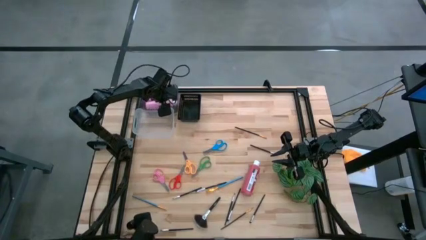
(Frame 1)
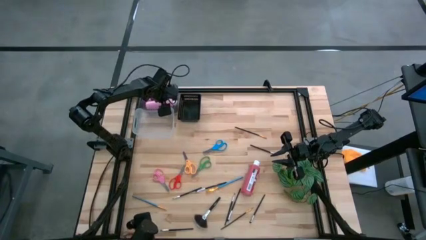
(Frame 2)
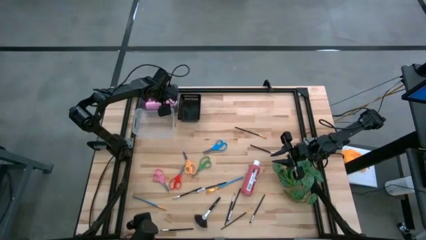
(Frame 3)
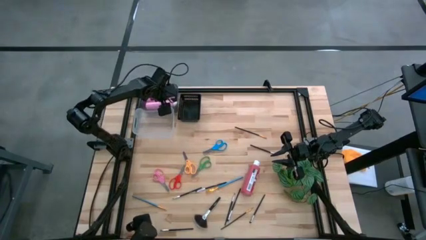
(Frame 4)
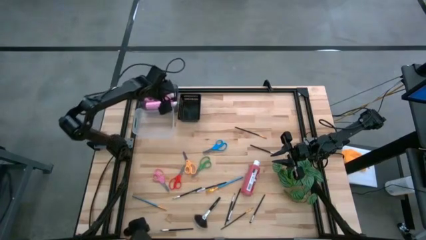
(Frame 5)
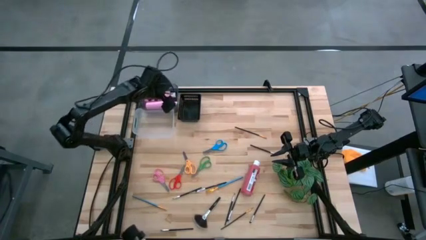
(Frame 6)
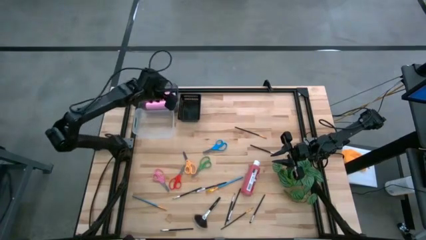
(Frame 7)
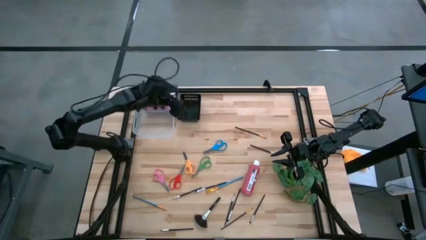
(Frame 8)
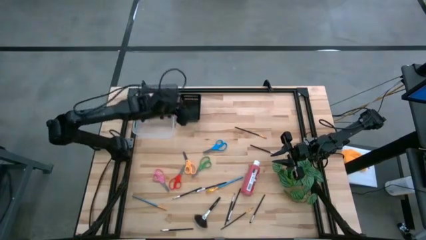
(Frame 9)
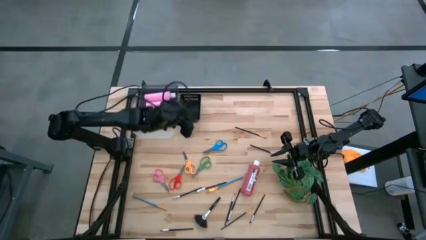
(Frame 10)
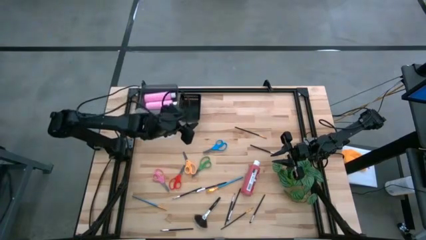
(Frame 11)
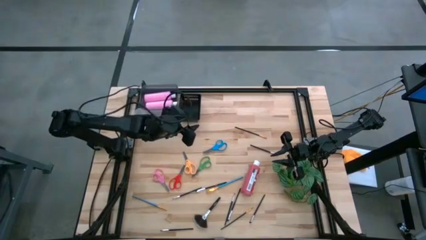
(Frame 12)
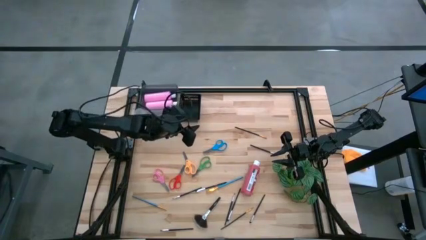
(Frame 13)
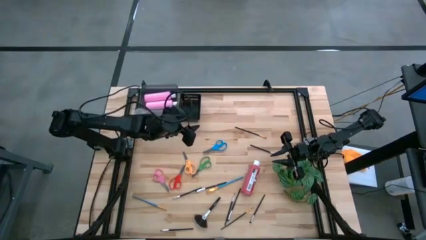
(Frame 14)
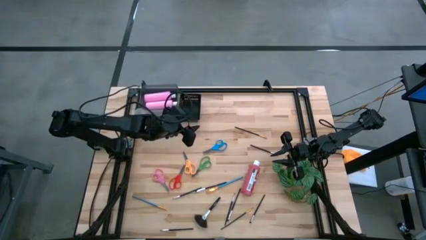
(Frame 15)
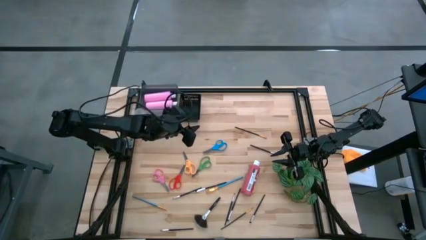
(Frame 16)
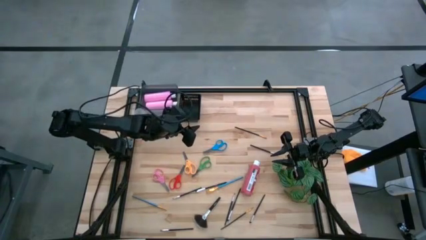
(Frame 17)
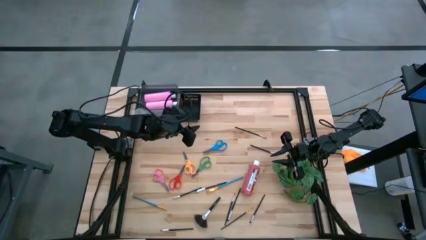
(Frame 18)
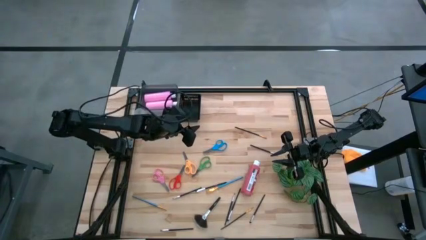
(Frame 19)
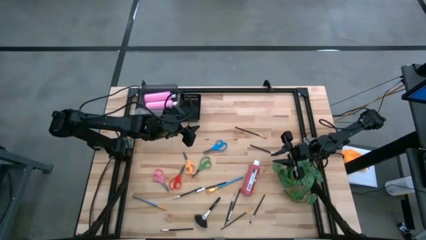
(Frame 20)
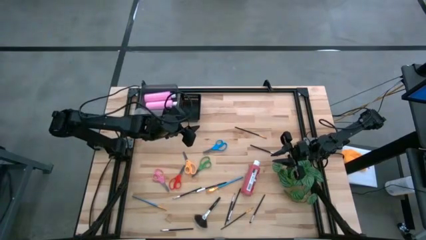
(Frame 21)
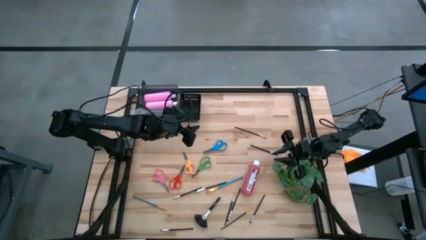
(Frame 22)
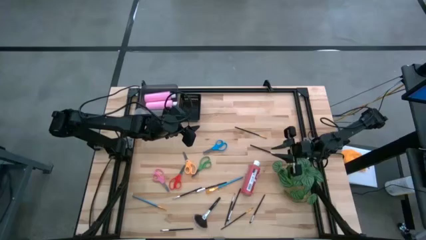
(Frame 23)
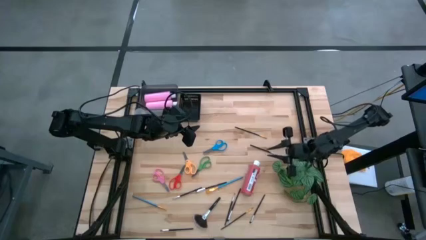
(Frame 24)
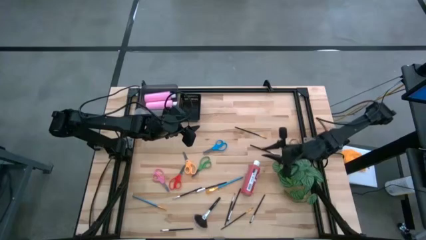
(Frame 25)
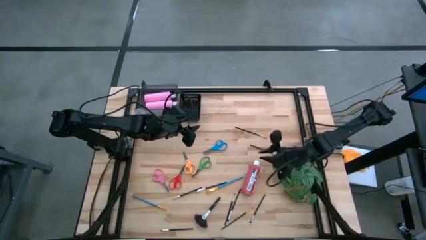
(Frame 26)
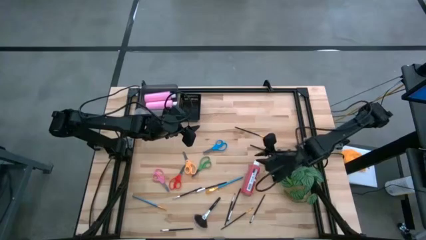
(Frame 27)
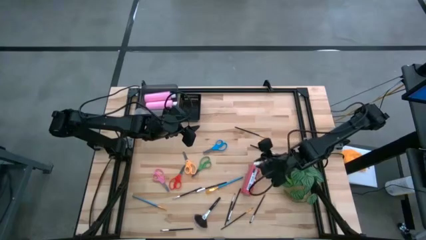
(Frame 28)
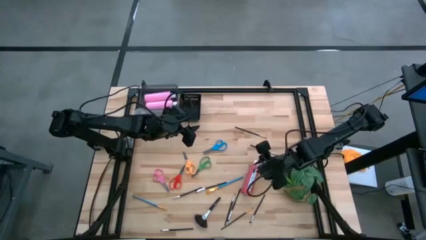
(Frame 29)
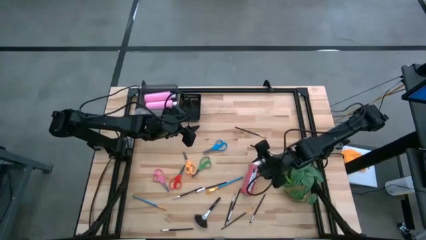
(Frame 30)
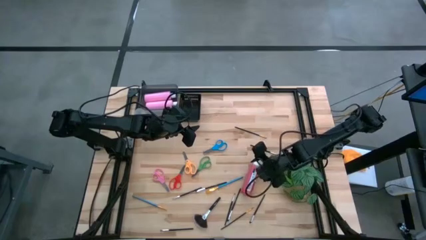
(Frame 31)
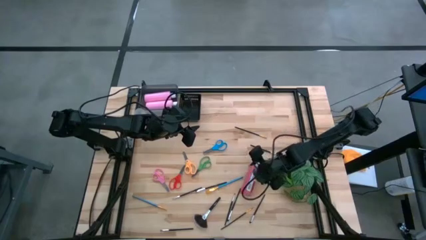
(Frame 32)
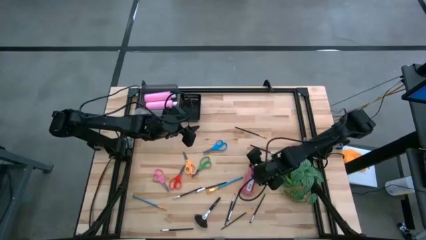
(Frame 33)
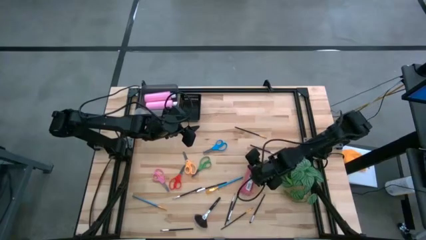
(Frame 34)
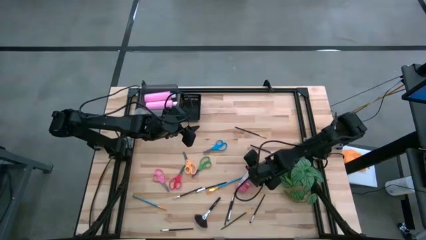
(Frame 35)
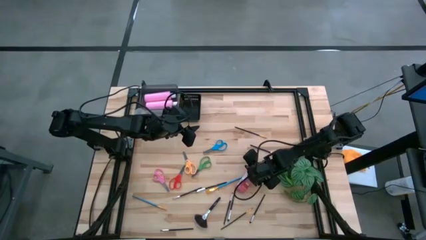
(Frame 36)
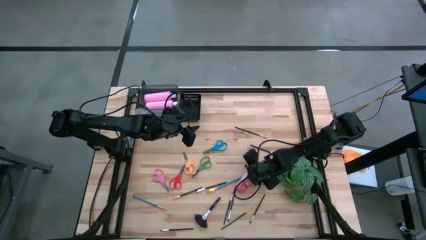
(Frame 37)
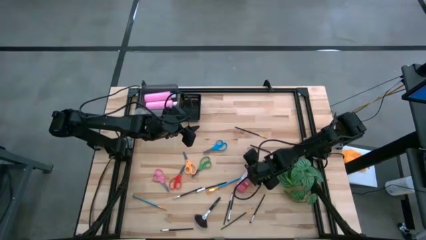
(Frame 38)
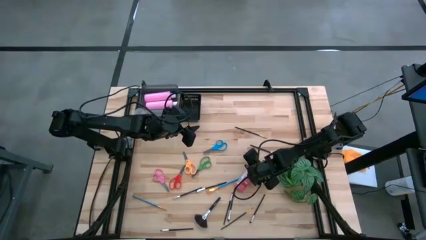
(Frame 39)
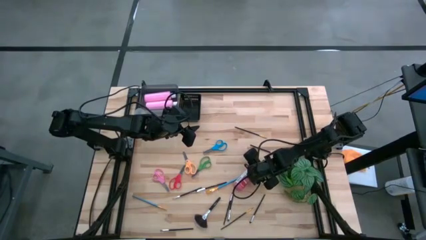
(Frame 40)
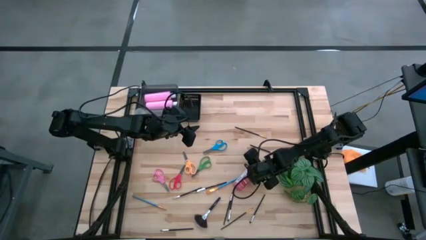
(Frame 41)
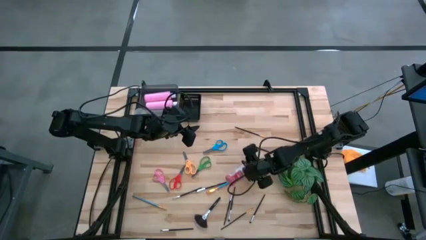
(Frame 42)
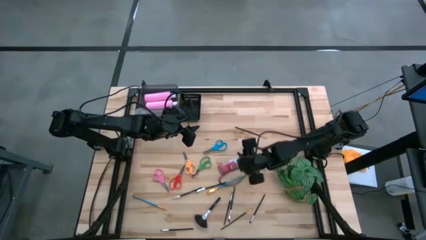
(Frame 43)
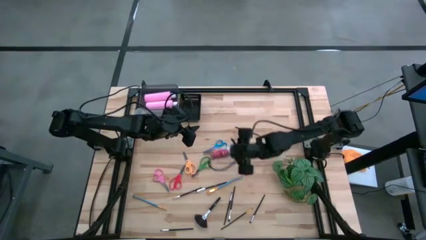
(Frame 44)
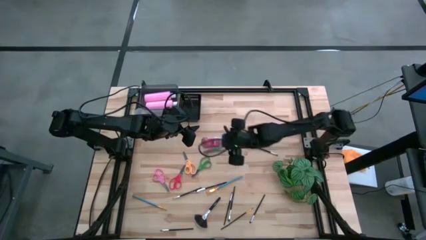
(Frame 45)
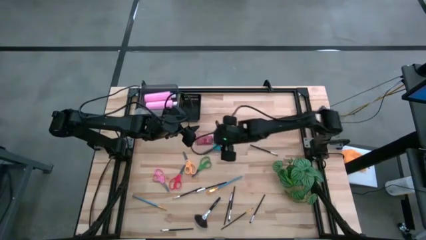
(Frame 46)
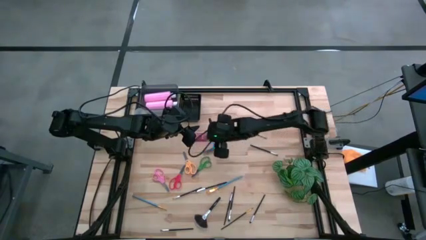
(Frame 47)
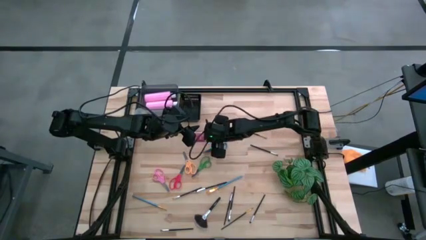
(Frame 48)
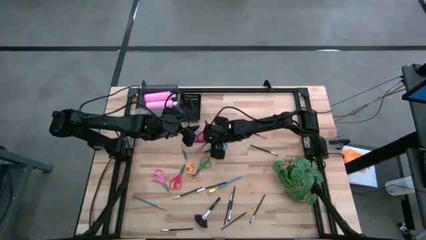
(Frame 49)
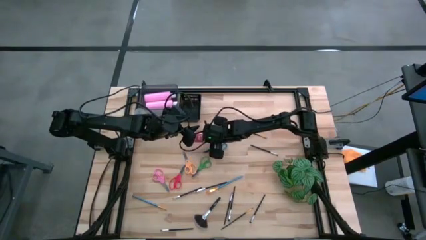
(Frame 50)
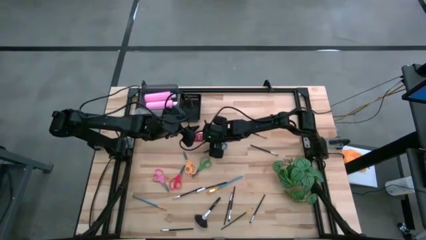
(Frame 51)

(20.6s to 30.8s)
Task: Pick & Place Paint Supplies
Put the red bottle into the left black bin

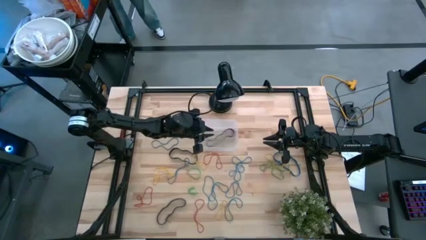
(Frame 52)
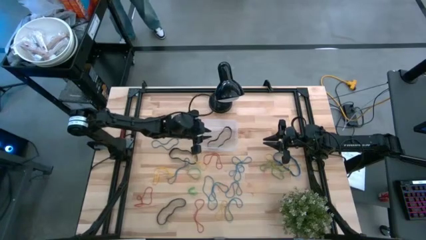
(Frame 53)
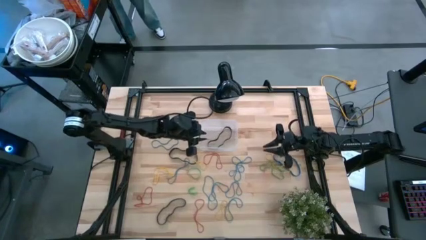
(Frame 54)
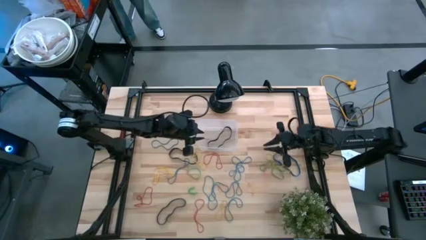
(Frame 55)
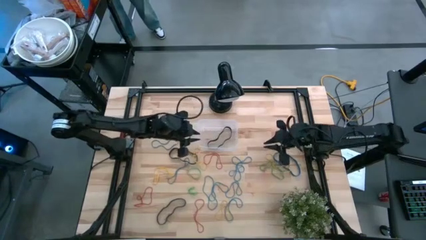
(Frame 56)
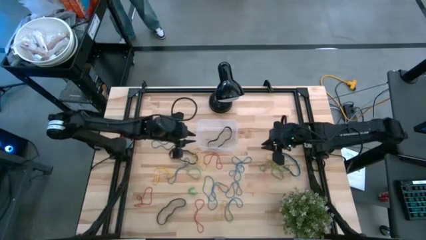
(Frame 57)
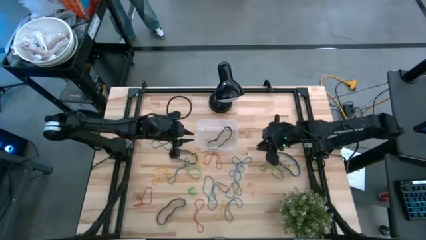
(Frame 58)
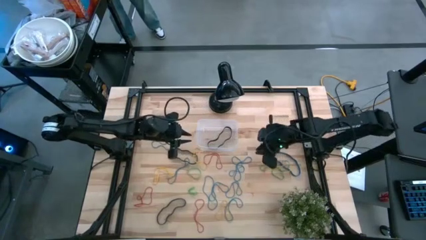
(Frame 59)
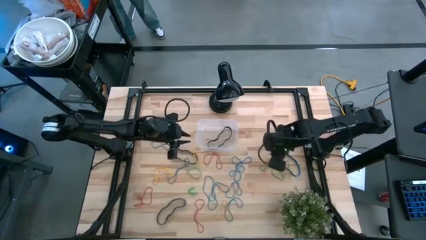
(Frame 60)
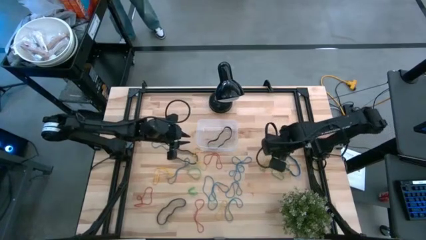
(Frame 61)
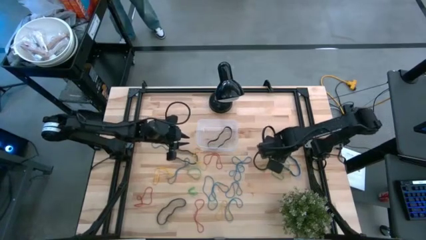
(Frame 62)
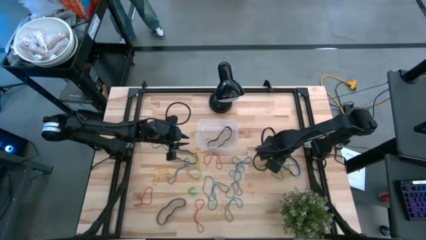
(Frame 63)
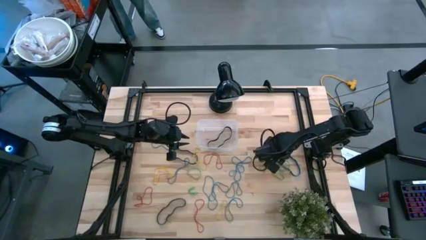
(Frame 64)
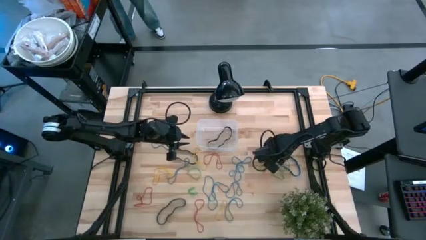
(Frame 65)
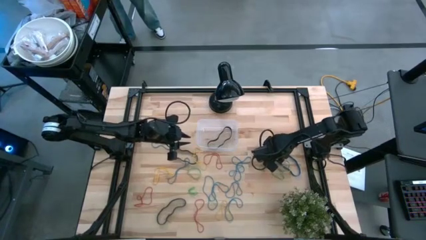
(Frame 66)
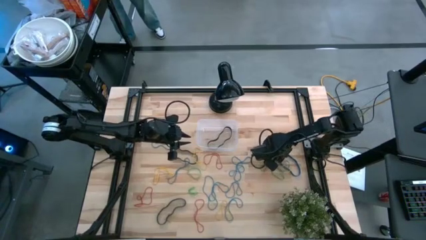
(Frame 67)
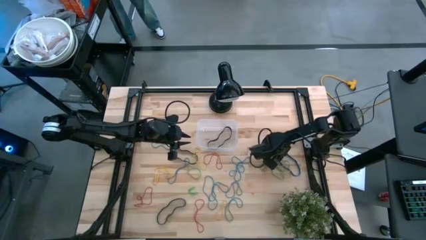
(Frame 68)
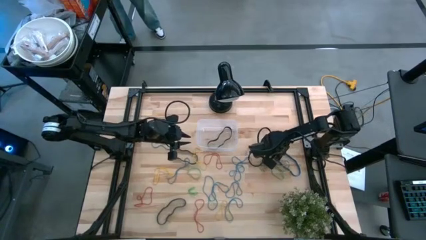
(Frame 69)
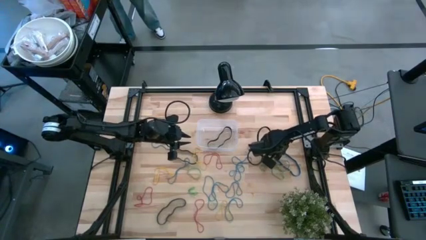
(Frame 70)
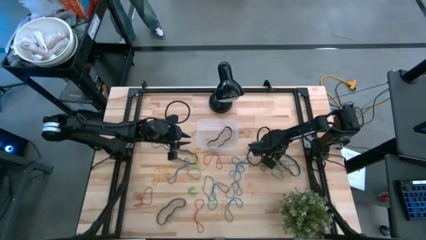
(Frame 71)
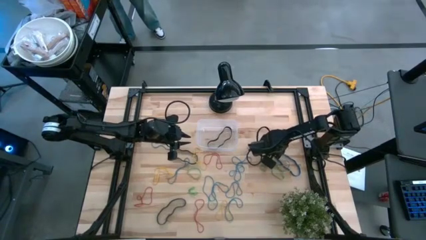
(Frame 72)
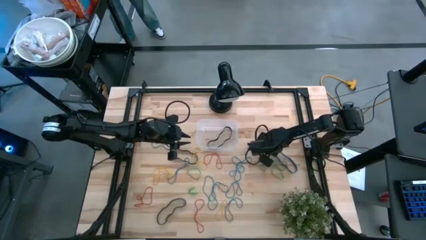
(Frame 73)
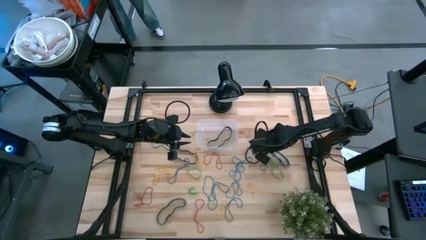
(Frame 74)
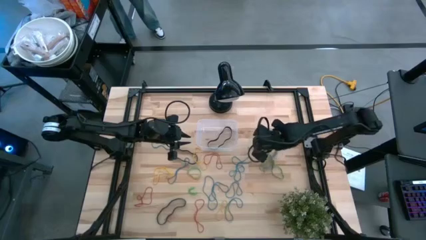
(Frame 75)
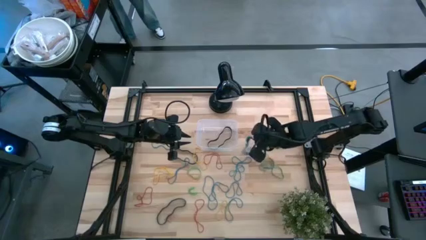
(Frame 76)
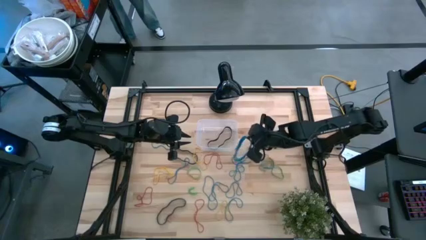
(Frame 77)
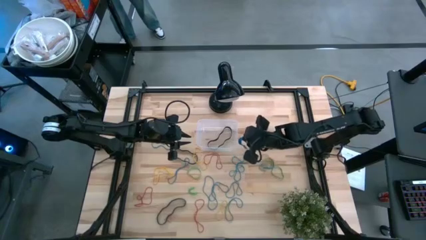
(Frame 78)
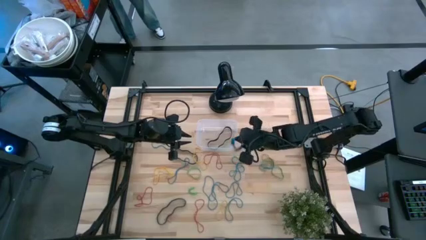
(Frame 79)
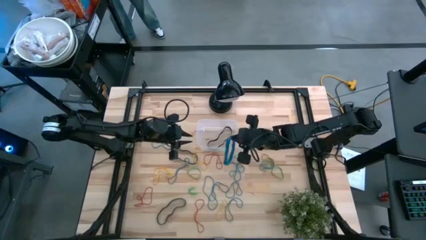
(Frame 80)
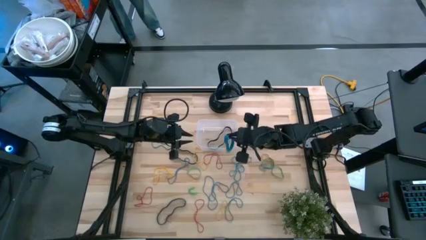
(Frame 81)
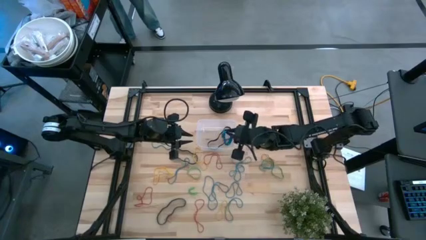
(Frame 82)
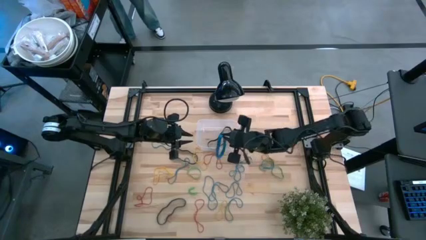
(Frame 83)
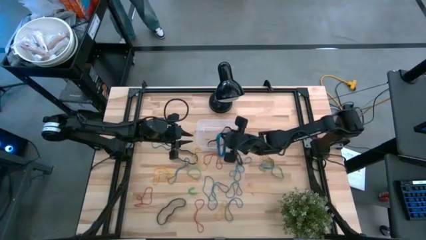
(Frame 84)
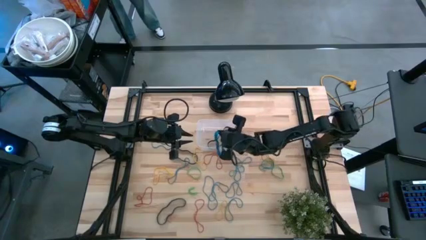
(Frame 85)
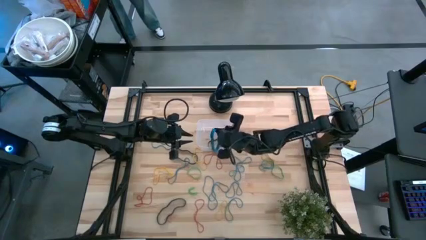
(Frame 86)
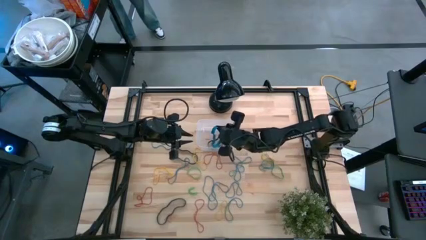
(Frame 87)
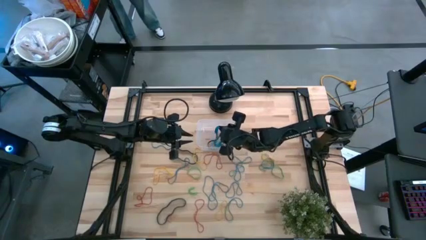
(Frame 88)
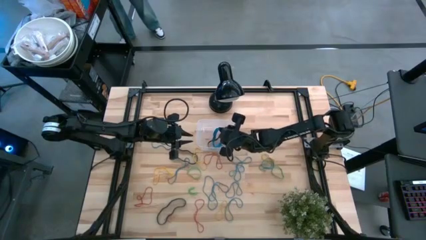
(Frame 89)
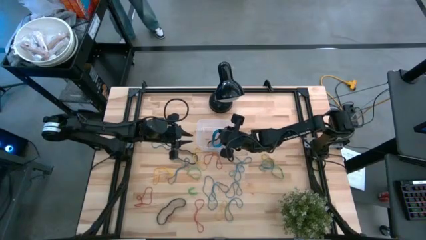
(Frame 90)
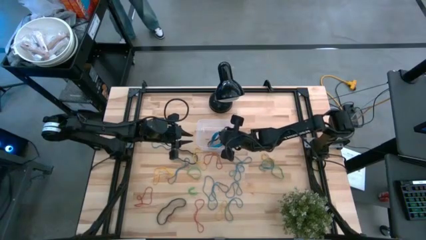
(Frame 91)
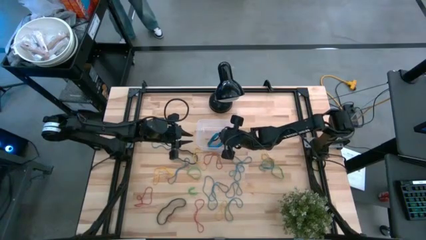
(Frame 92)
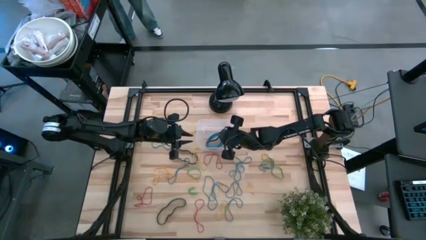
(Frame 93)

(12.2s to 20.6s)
Task: Pick and place rubber bands into bin
Put the blue rubber band into the transparent bin
